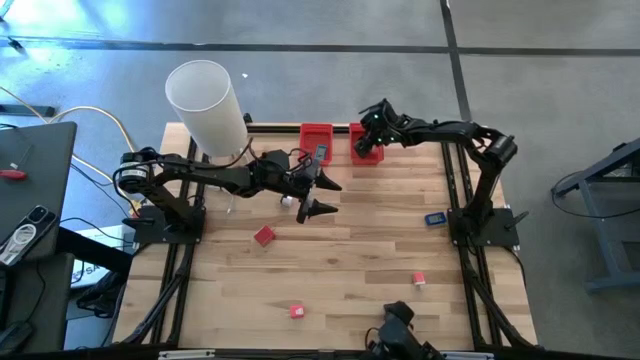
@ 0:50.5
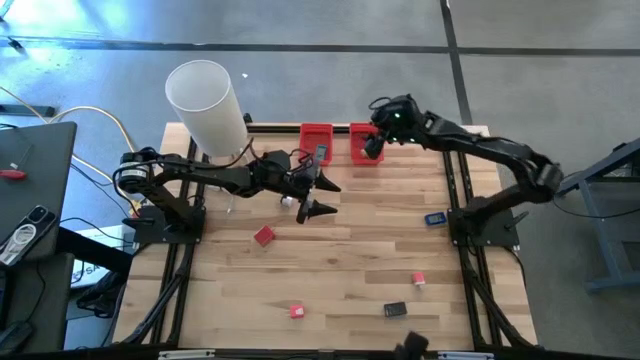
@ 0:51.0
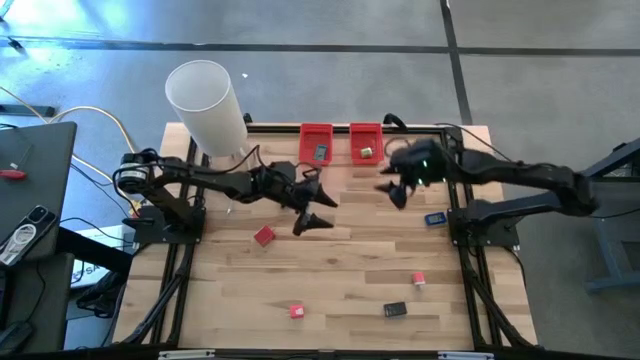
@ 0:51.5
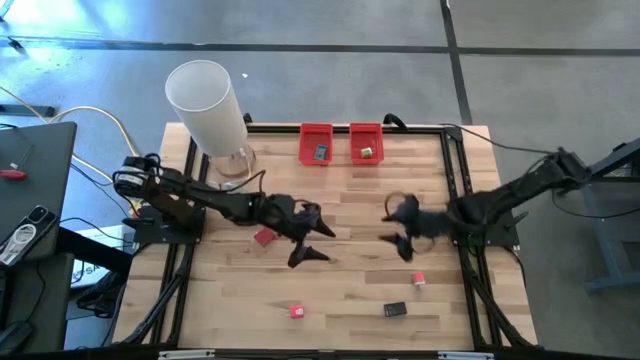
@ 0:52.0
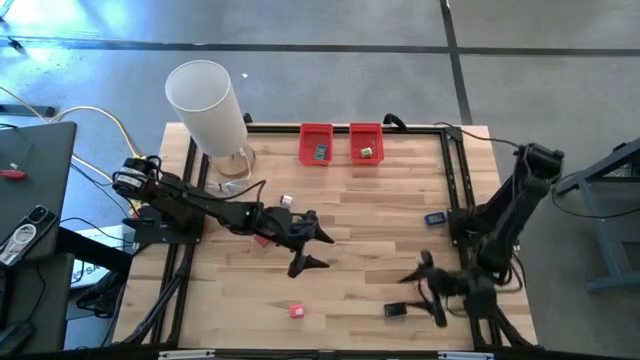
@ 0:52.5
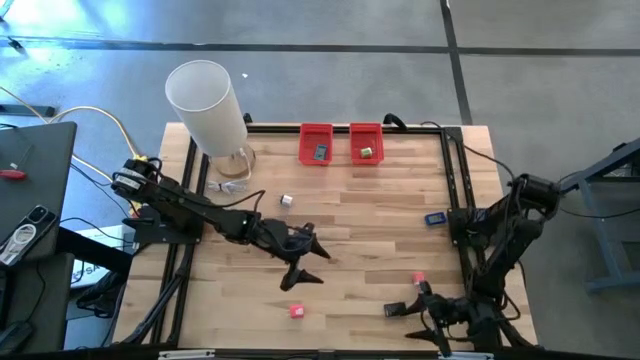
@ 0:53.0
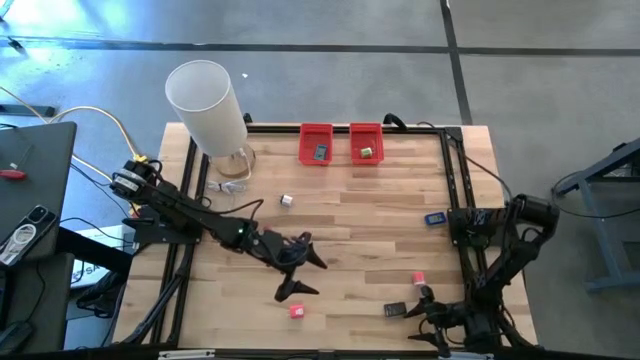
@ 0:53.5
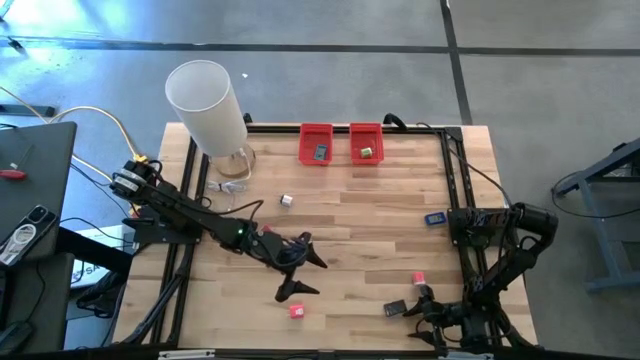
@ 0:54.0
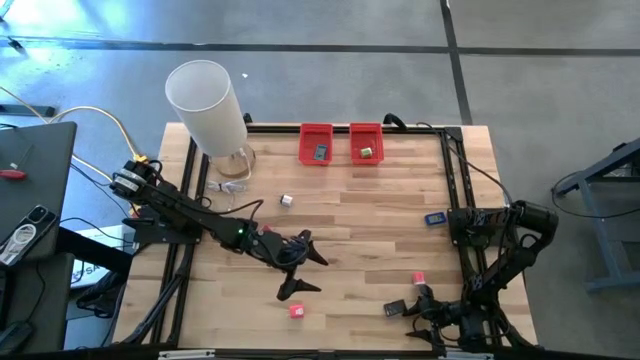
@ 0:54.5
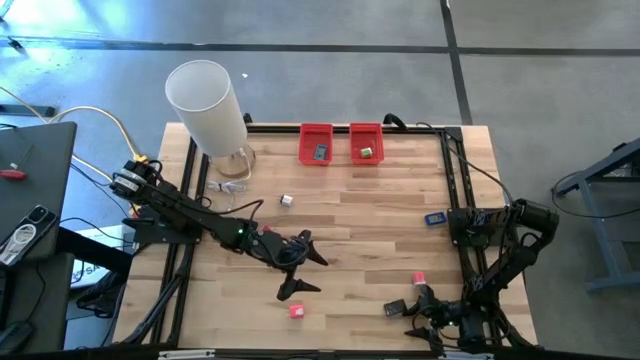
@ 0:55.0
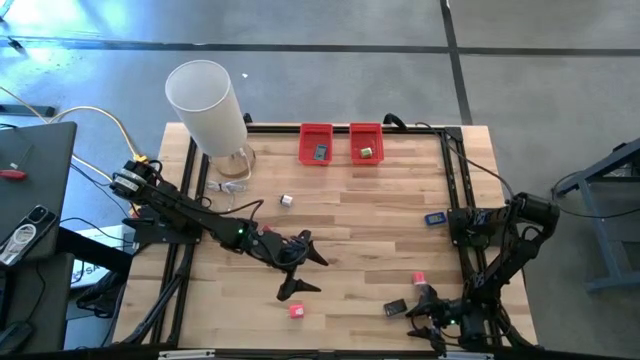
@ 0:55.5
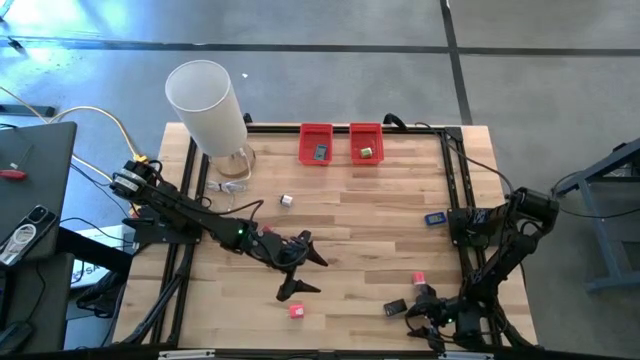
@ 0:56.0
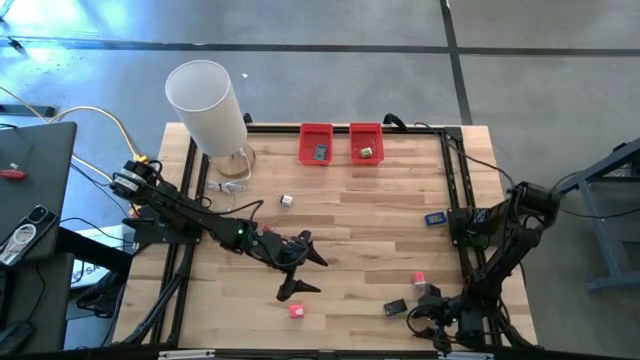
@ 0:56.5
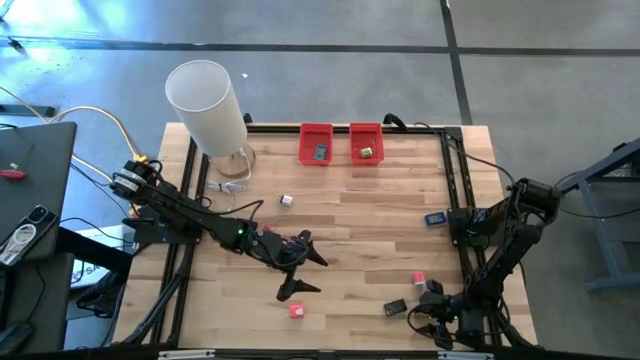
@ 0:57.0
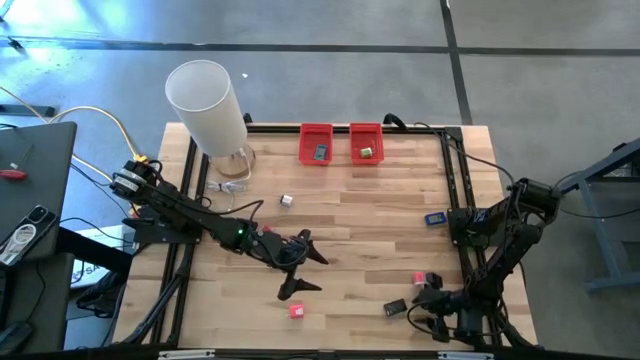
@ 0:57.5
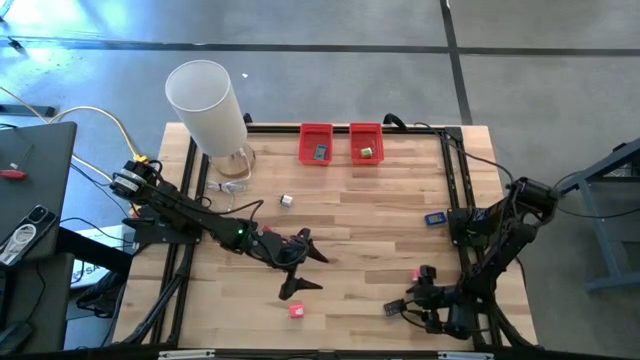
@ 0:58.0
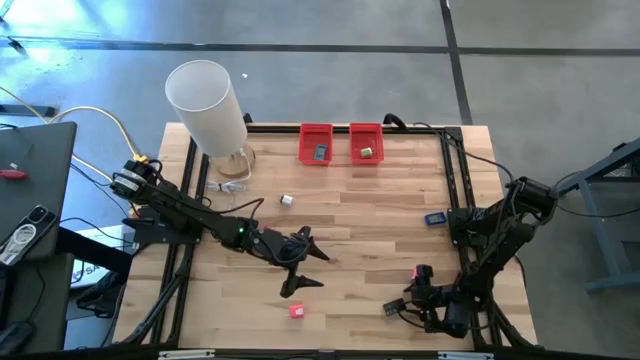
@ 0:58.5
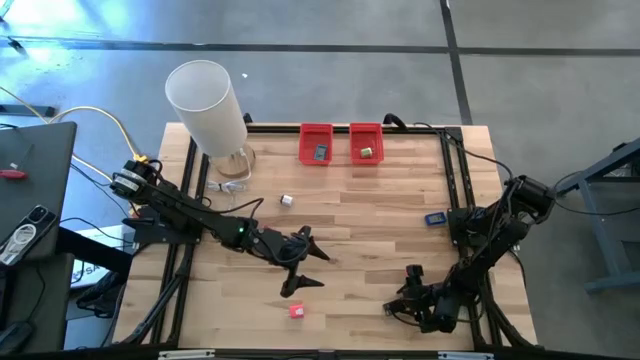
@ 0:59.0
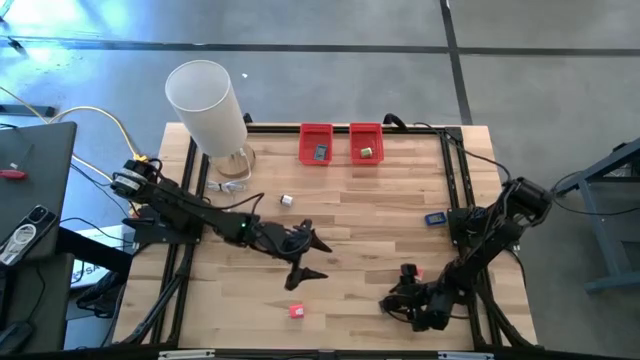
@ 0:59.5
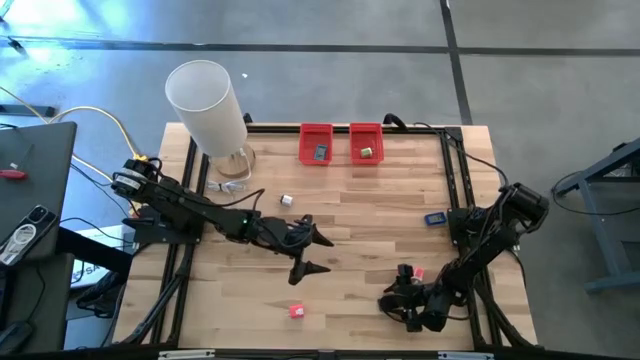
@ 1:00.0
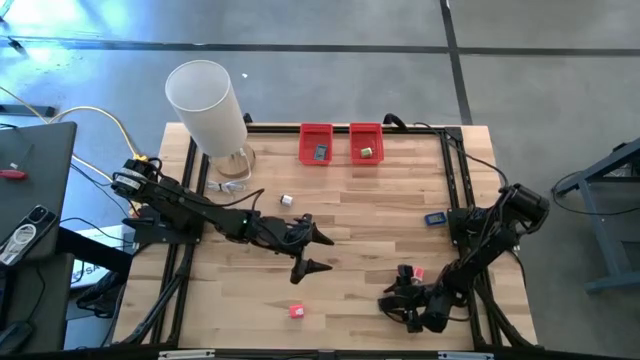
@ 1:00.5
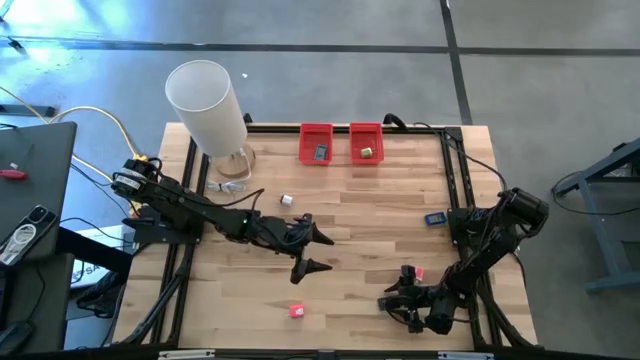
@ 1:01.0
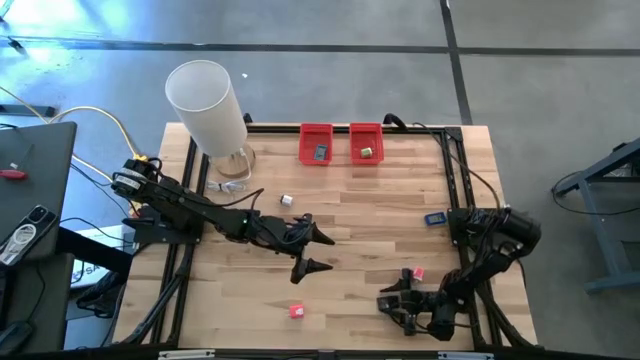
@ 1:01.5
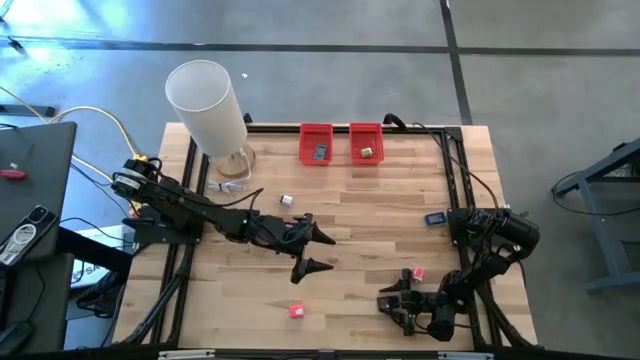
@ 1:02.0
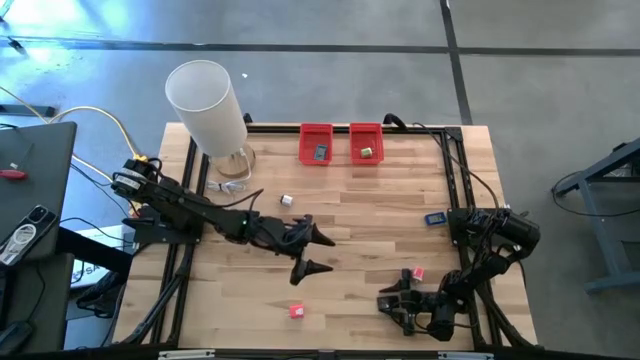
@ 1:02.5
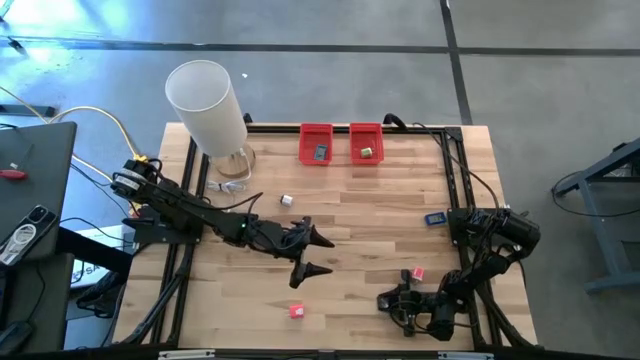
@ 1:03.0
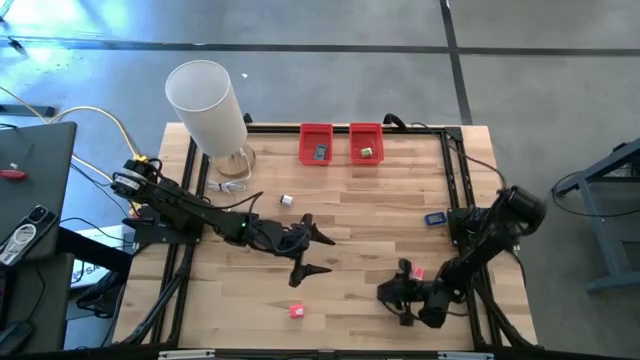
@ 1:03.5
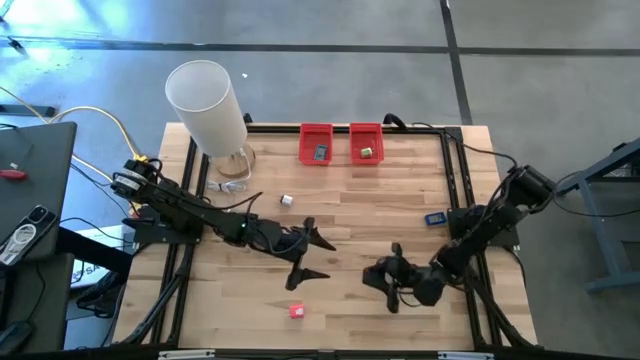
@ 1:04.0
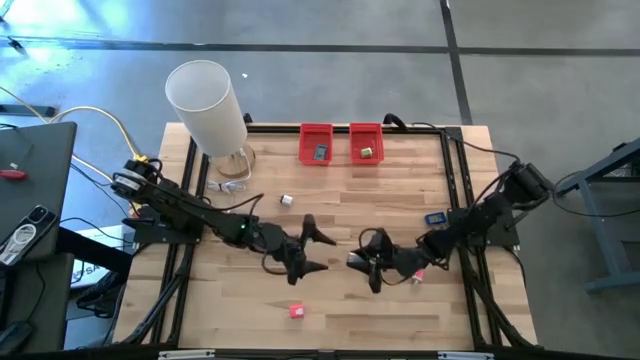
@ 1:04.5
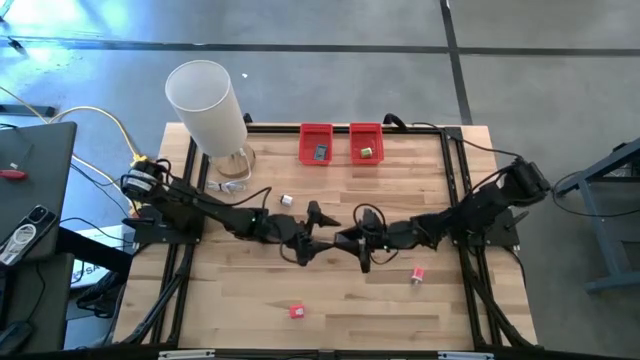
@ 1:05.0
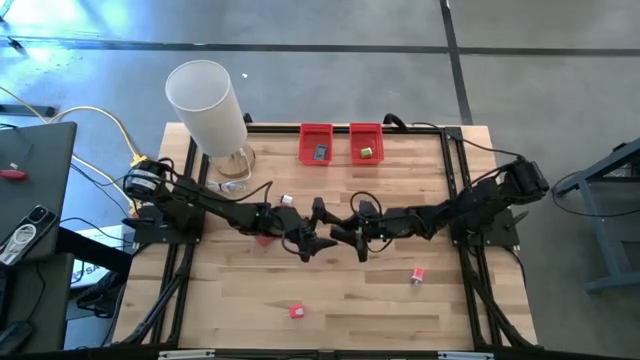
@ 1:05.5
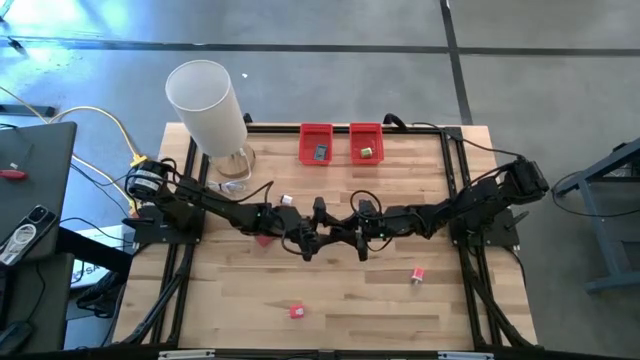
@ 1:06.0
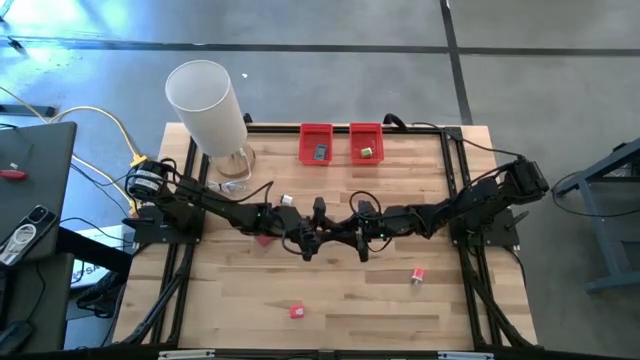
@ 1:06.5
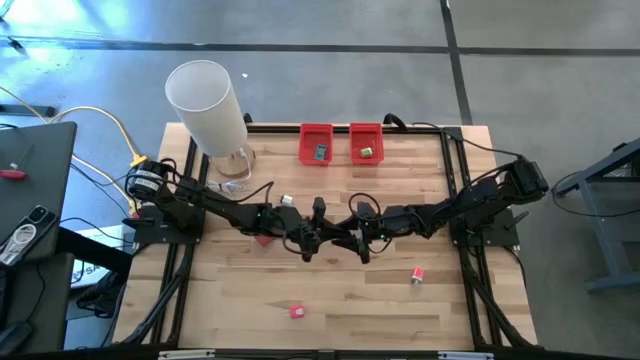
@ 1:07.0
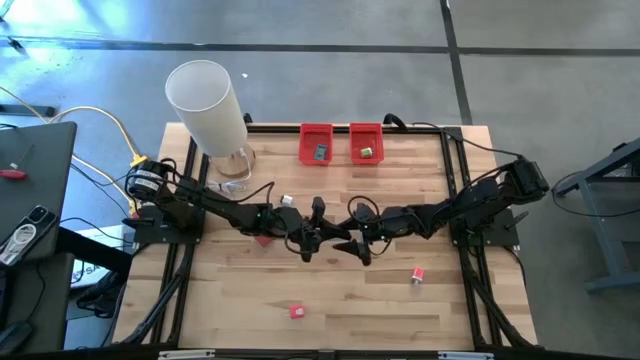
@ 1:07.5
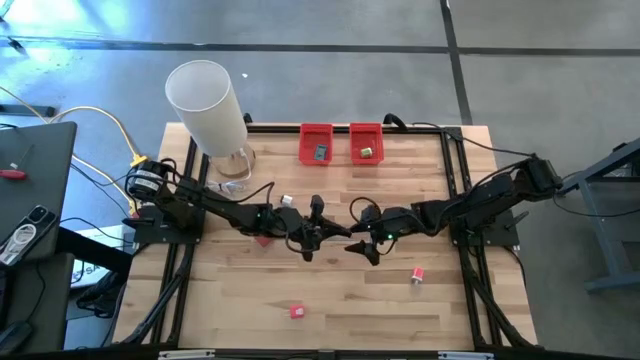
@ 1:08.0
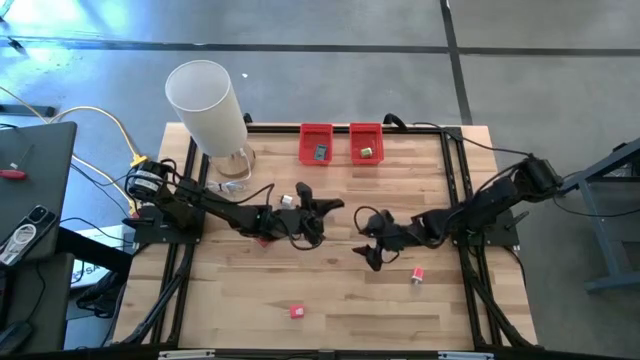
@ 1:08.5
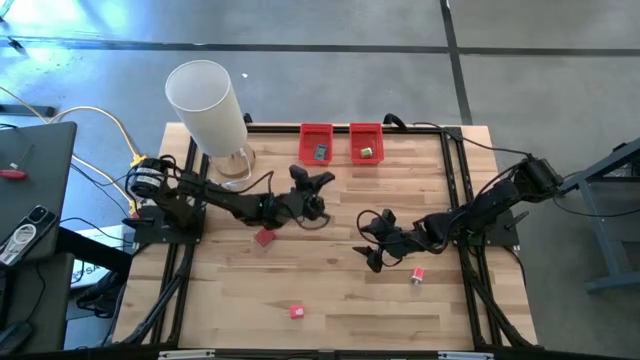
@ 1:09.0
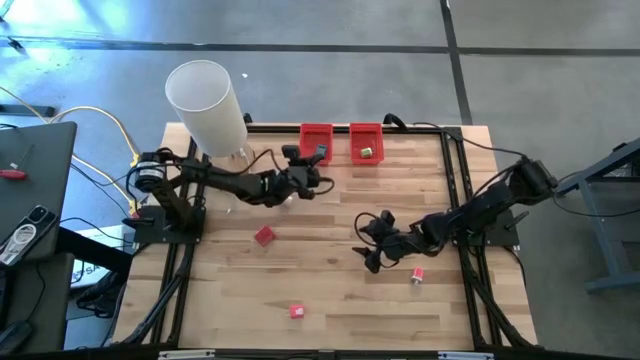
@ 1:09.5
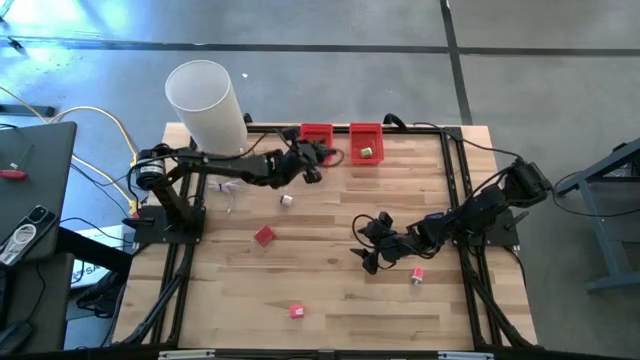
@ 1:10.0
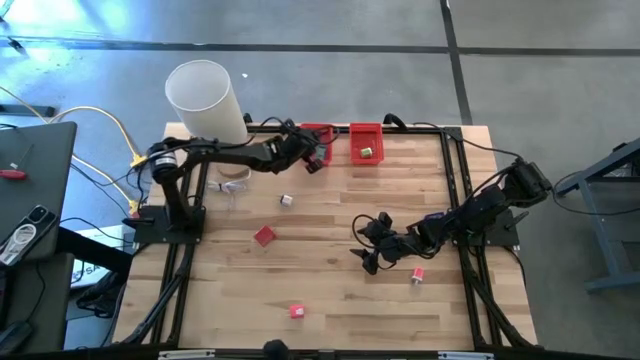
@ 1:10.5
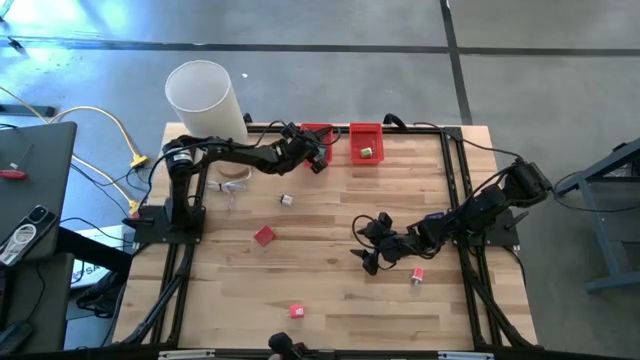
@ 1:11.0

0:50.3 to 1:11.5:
Task: Pick & Place Office items
Put the black timer into the left red bin
